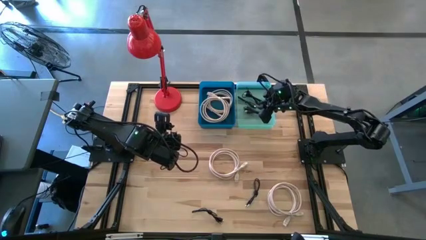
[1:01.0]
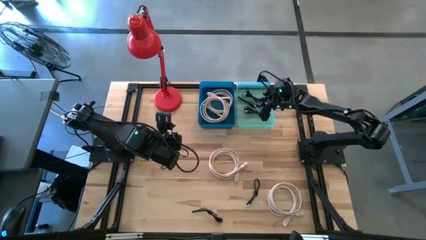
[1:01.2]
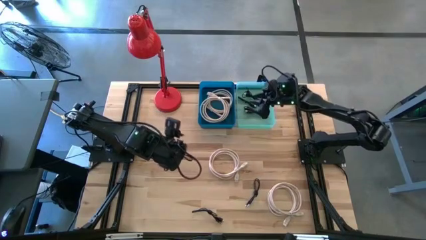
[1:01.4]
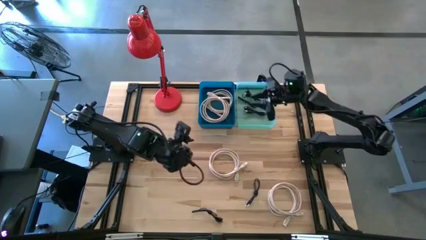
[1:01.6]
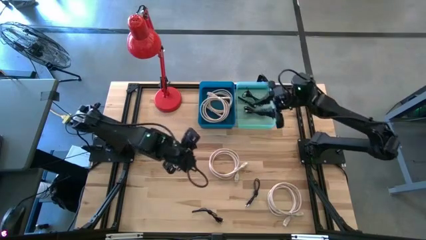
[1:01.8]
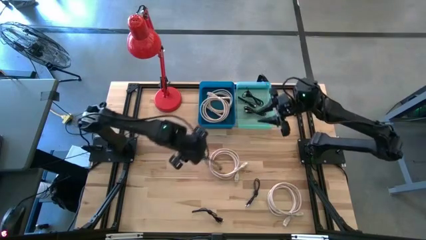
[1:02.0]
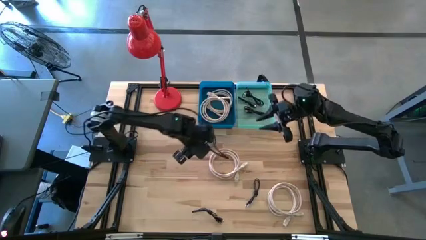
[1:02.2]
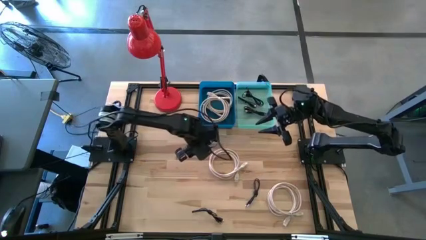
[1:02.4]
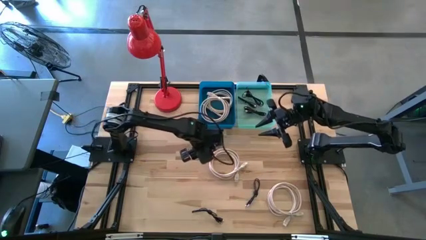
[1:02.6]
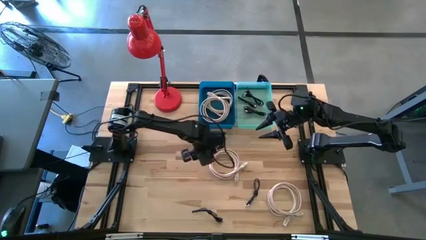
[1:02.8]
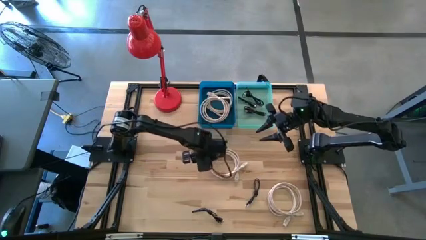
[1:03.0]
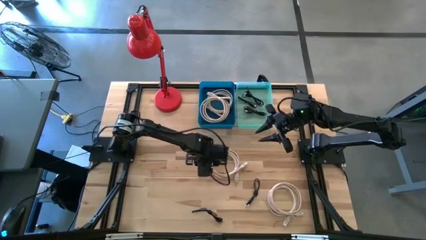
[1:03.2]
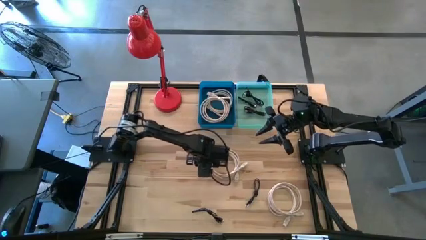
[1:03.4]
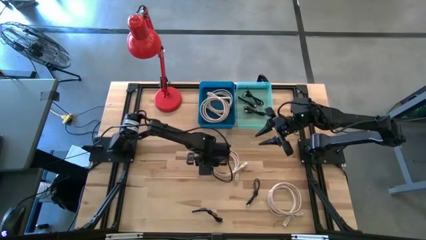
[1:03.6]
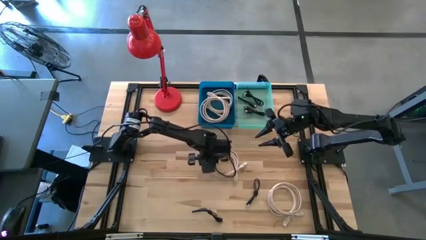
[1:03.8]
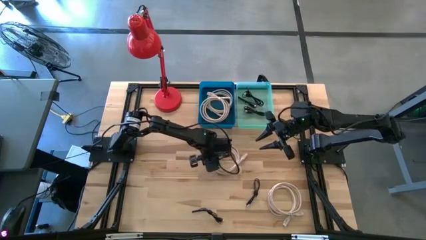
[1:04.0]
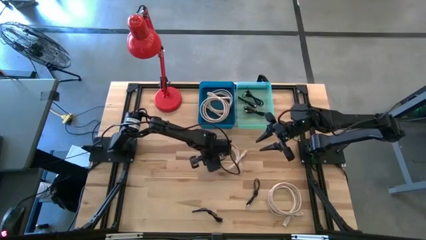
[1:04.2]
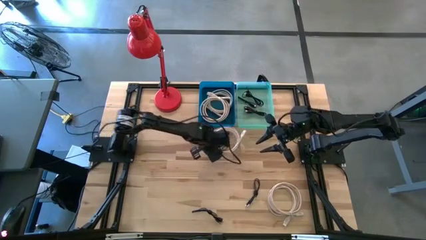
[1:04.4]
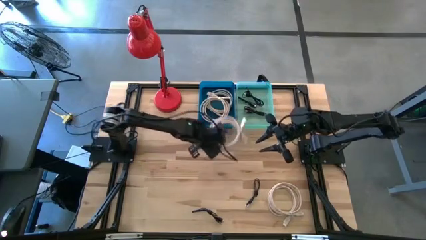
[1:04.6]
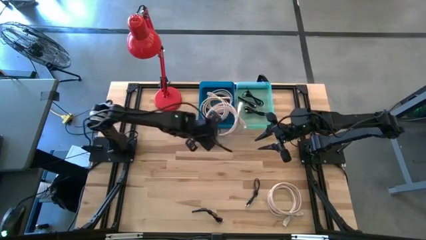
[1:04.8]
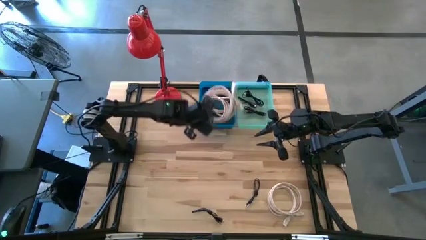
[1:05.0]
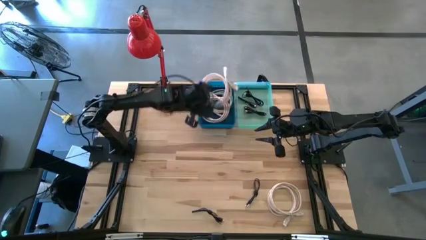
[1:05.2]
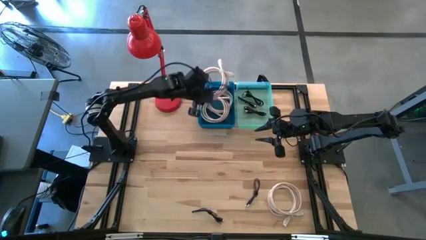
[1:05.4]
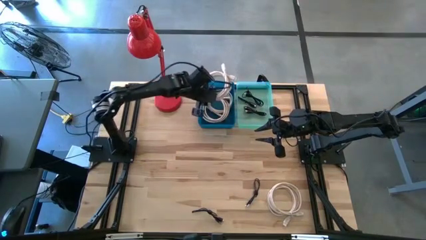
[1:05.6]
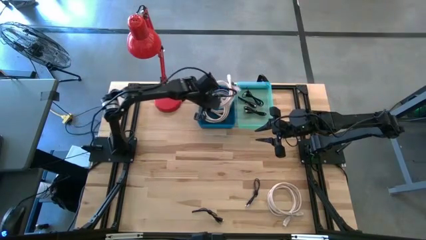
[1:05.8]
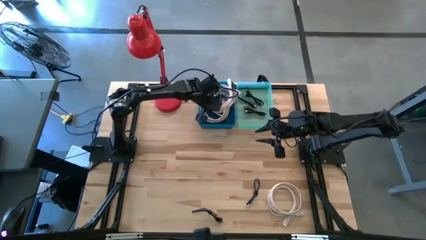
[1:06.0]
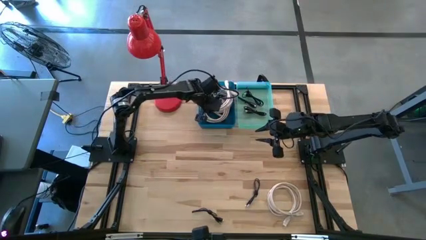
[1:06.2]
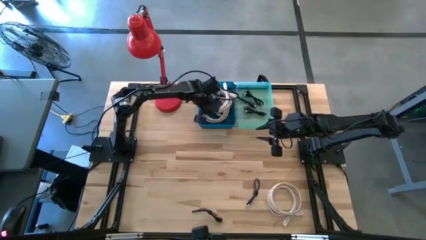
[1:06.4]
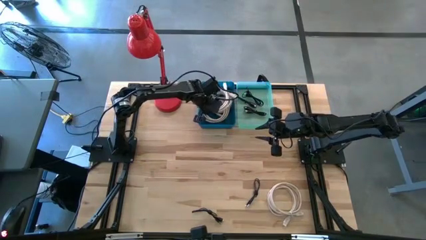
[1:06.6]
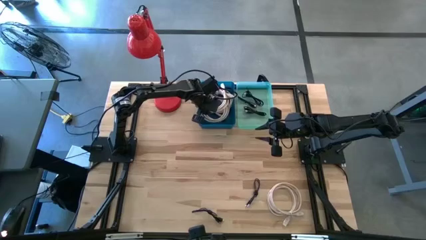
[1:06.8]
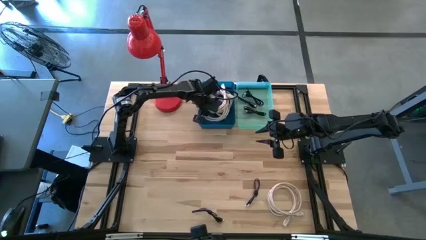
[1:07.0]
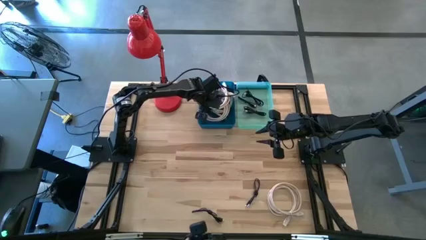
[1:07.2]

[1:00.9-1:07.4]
Task: Pick & Place USB Port
Put the white charger cable into the blue bin

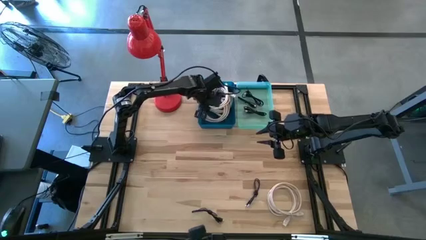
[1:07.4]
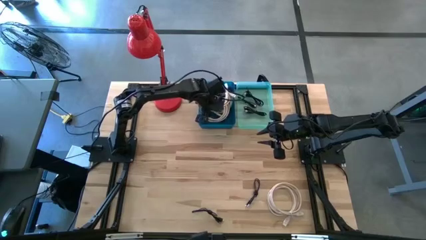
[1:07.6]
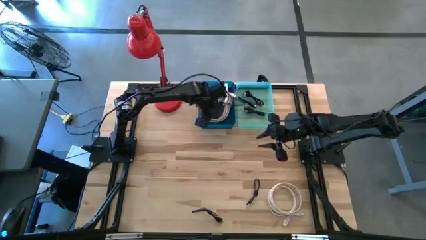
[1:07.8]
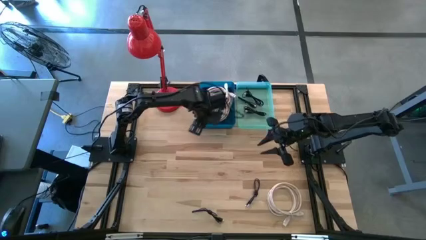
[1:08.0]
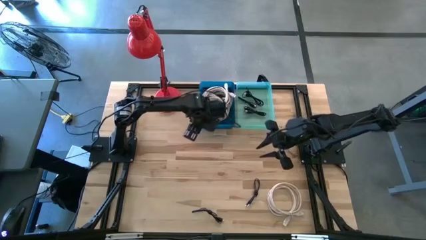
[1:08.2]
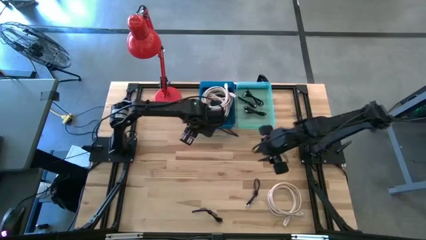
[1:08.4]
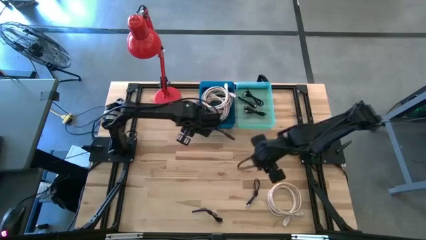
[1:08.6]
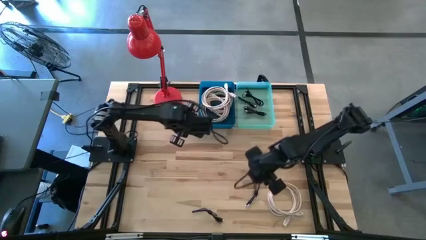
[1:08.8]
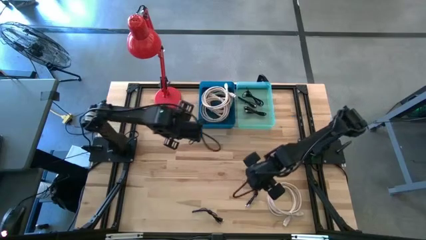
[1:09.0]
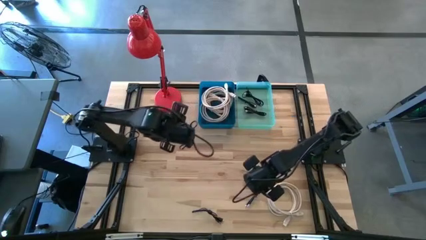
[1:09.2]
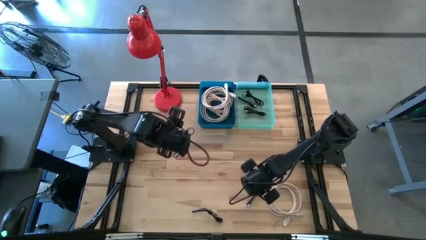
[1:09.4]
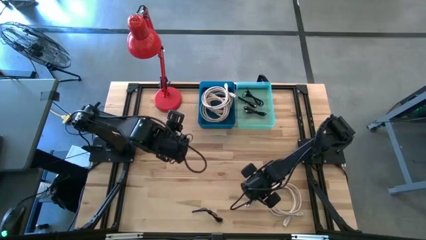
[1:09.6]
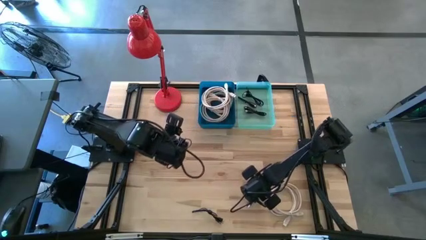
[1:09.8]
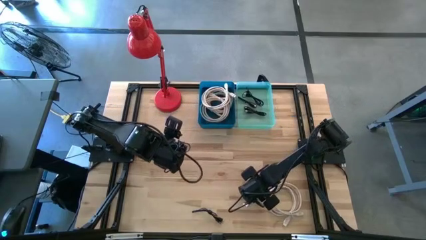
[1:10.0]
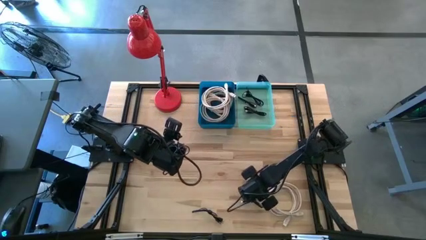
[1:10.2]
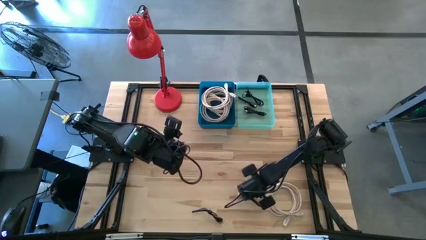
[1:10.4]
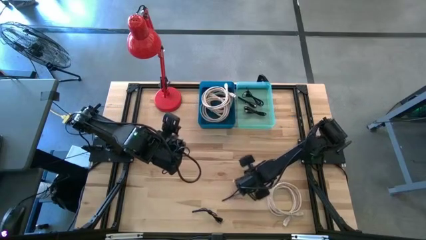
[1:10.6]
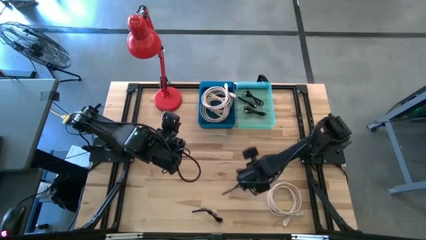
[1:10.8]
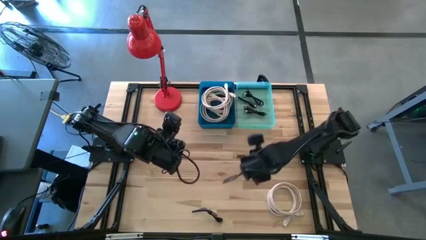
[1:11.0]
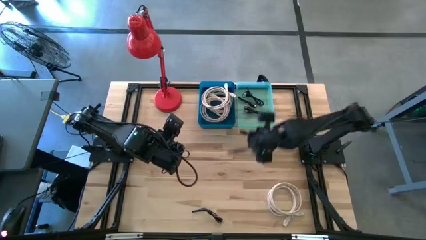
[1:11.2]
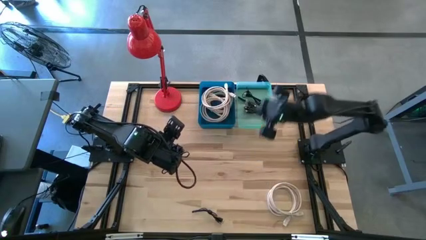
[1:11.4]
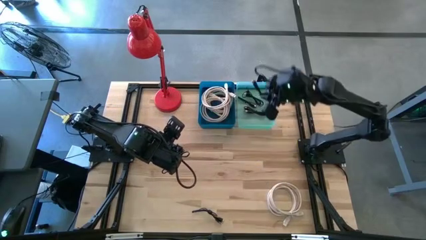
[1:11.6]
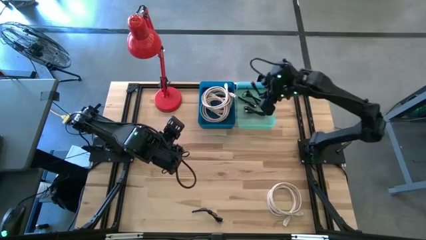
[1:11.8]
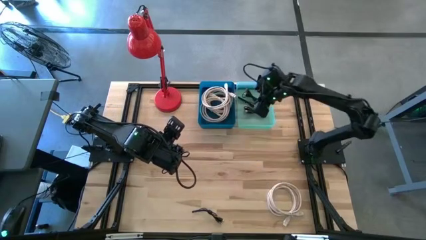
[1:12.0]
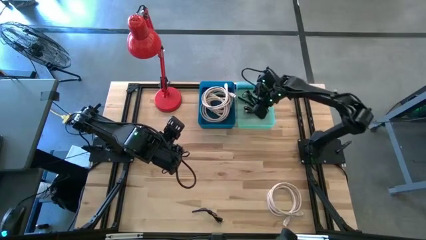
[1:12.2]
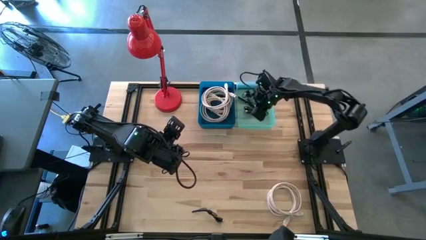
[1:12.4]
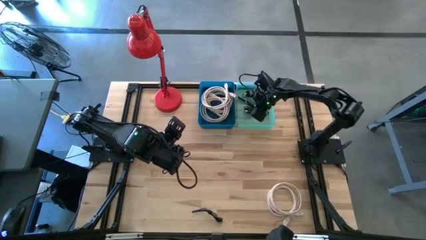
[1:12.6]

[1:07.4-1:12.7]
Put the black charger cable into the green bin

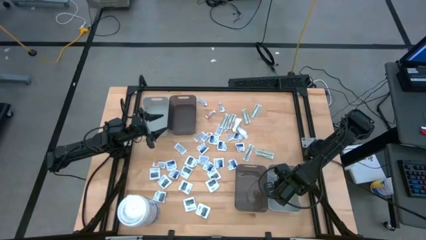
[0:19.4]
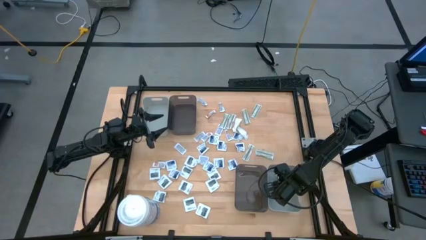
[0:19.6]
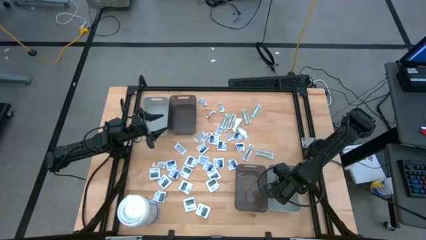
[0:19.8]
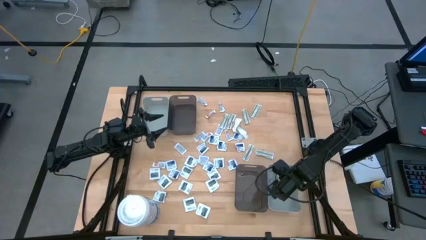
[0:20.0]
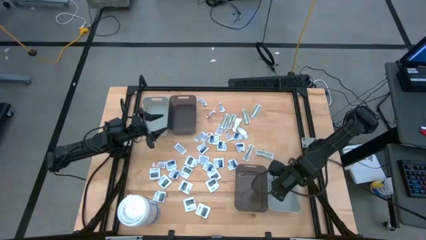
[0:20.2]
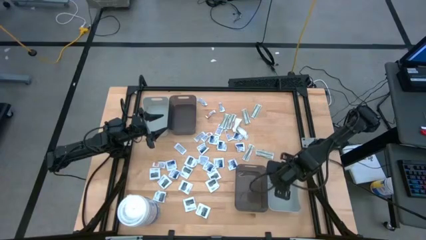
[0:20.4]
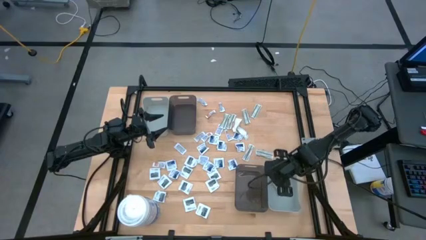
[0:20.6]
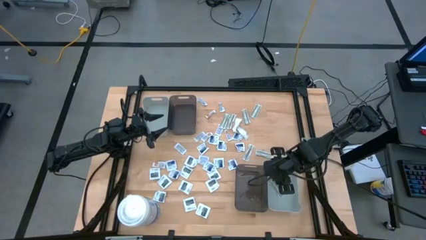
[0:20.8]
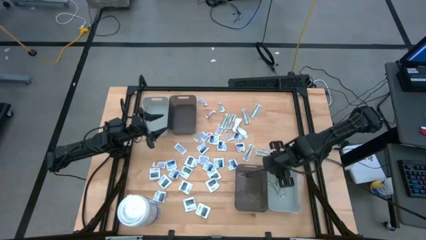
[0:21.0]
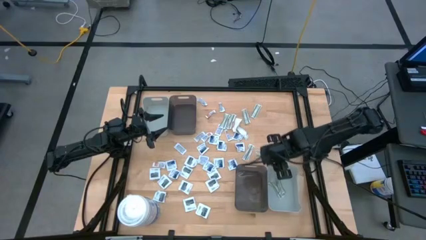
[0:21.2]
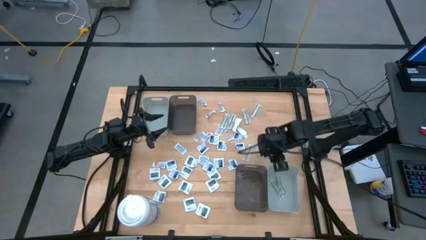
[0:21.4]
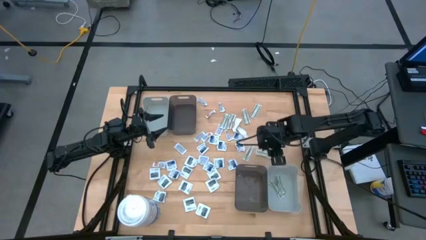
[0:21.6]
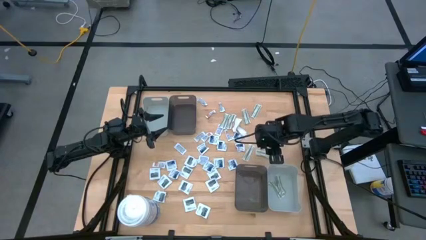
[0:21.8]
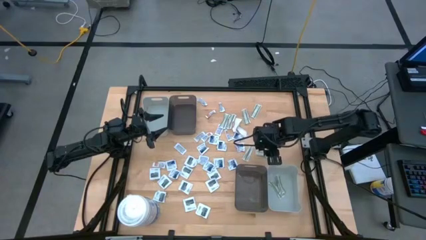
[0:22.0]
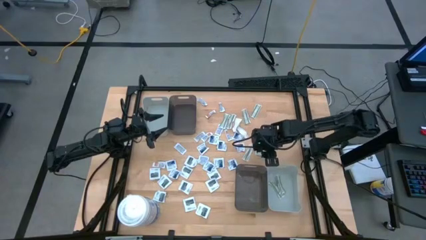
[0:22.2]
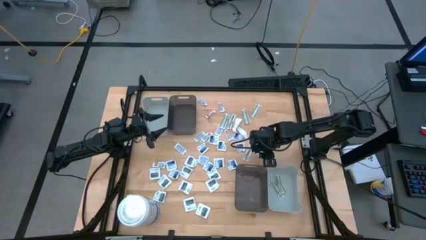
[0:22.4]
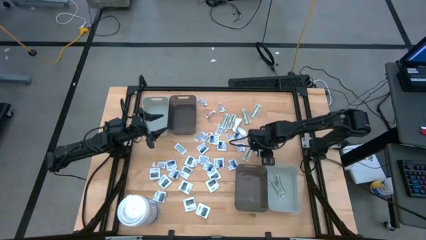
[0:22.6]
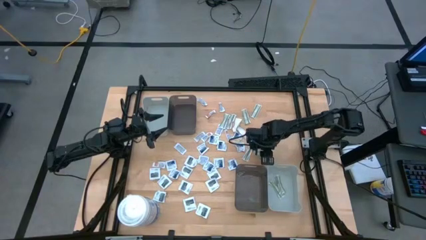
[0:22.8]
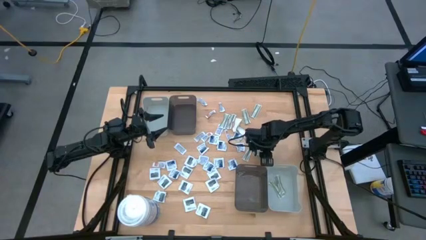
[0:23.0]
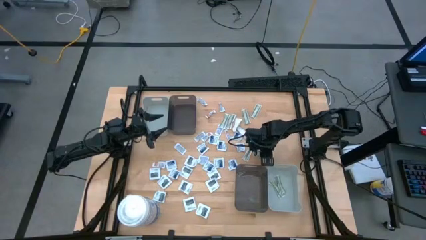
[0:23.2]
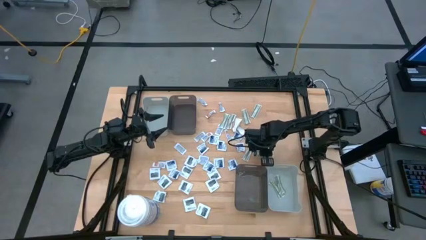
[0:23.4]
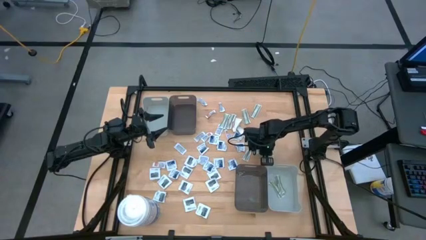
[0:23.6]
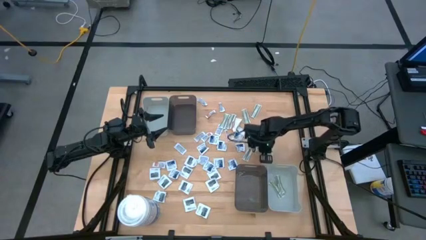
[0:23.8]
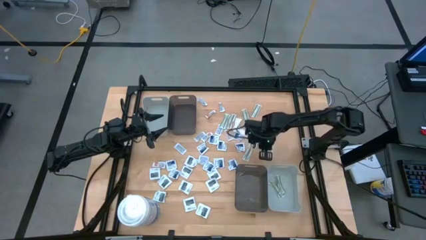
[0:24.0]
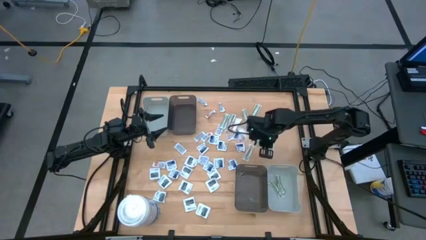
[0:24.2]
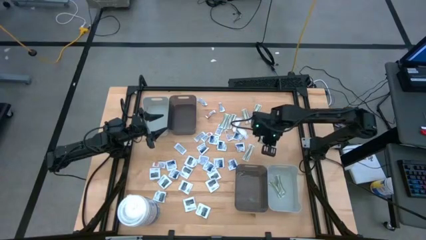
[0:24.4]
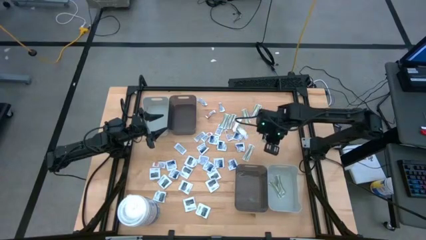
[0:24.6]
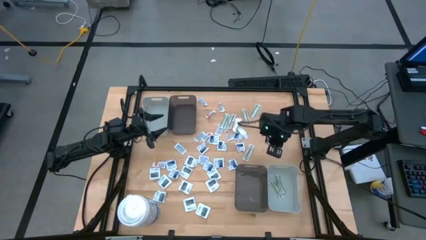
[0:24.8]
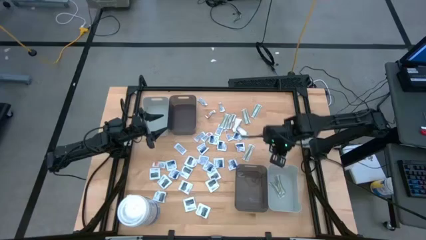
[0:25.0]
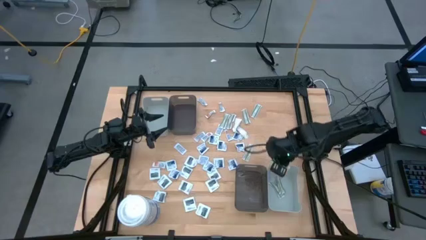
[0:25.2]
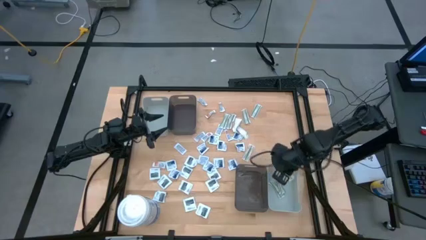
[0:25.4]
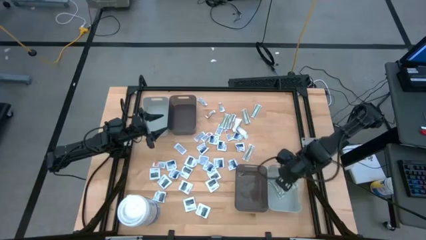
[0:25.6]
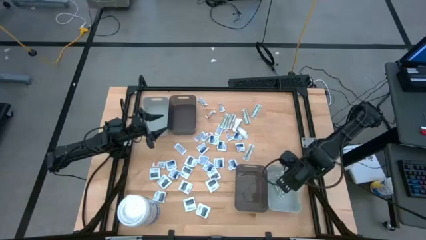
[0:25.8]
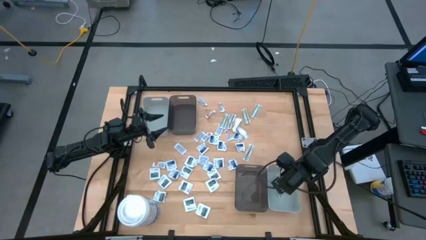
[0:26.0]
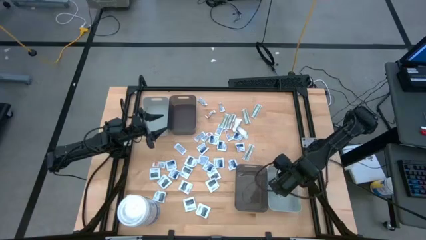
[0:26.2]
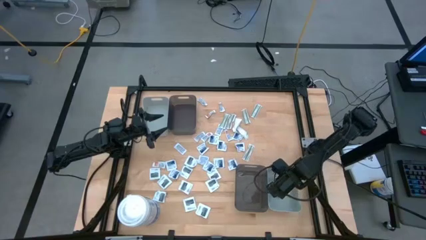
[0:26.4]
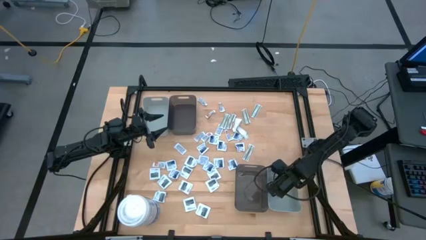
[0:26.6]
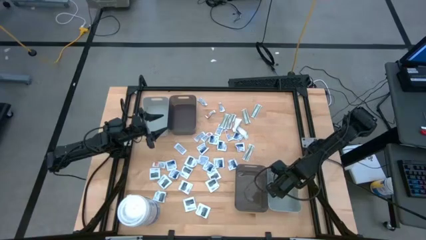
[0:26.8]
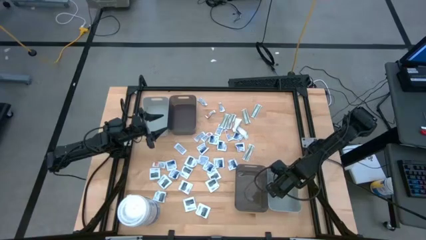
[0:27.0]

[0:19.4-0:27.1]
Task: Pick & Place First Aid Supplies
Put the white bandage pack into the bottom gray bin
